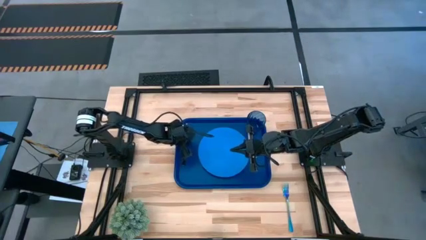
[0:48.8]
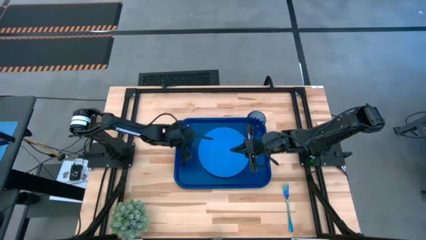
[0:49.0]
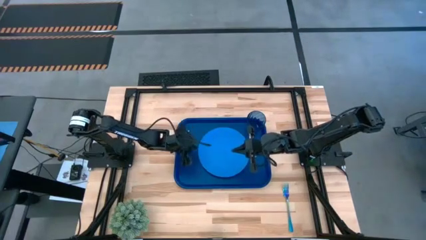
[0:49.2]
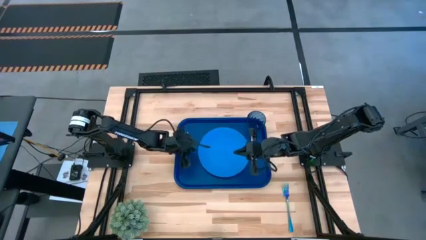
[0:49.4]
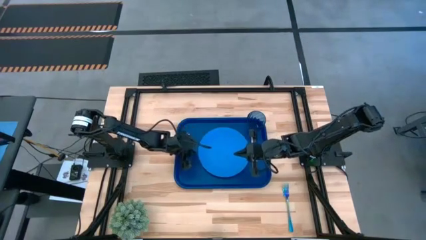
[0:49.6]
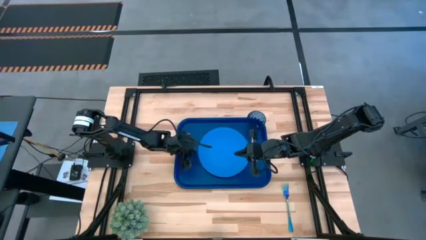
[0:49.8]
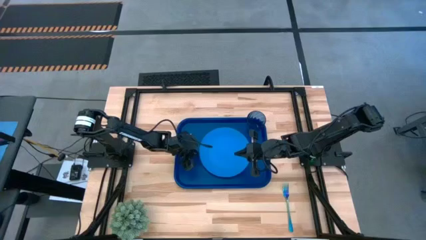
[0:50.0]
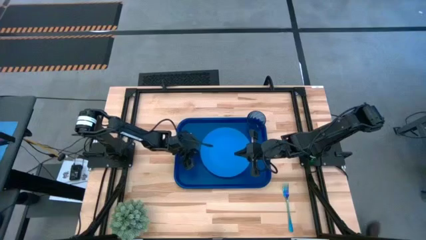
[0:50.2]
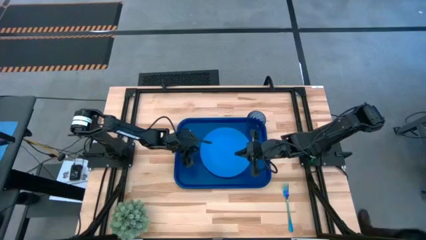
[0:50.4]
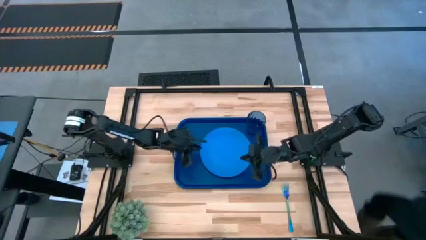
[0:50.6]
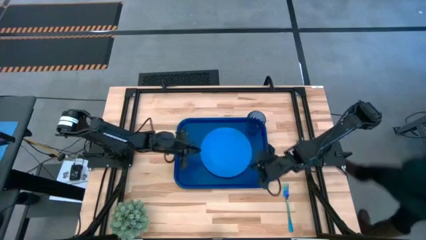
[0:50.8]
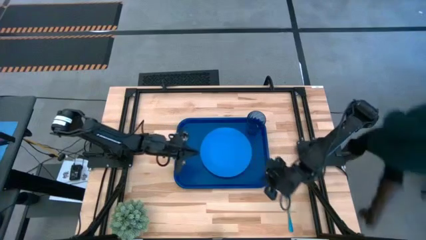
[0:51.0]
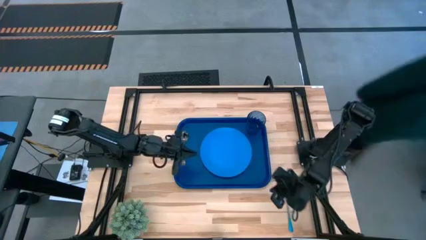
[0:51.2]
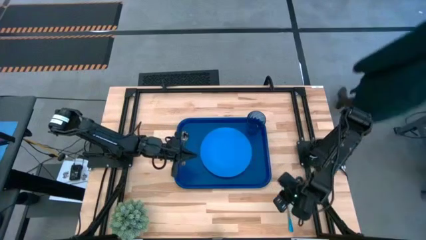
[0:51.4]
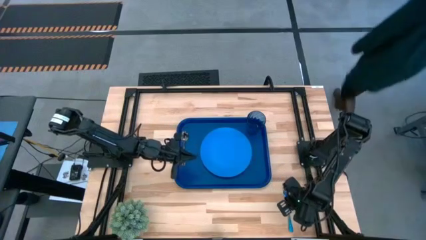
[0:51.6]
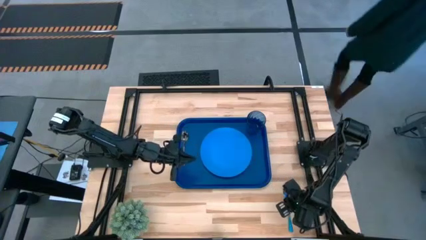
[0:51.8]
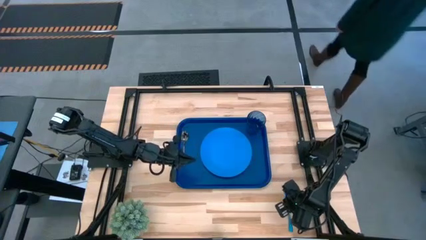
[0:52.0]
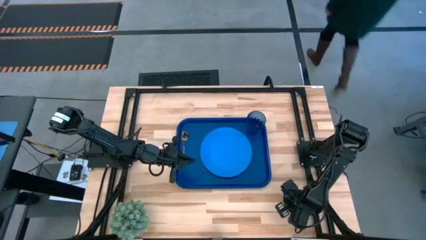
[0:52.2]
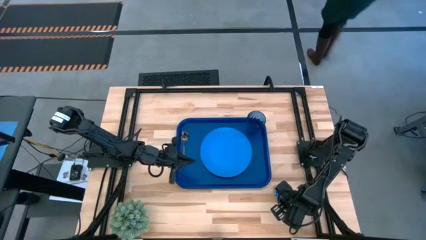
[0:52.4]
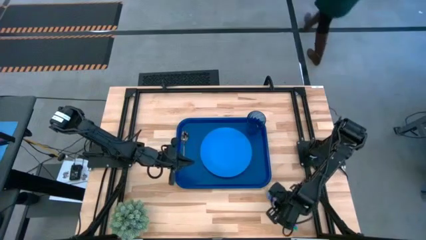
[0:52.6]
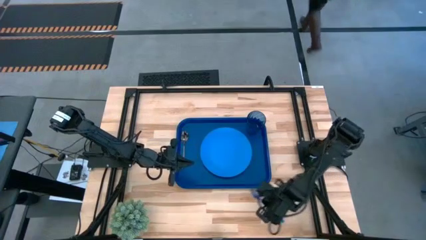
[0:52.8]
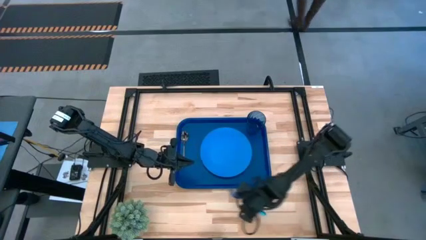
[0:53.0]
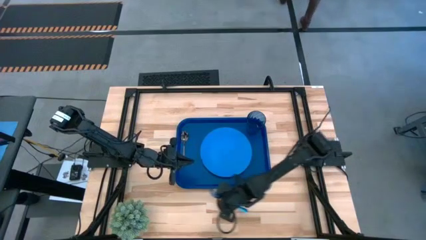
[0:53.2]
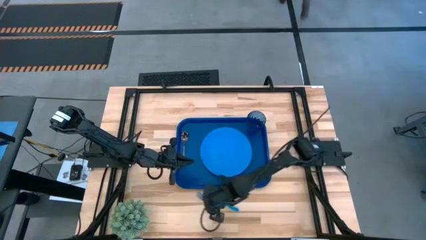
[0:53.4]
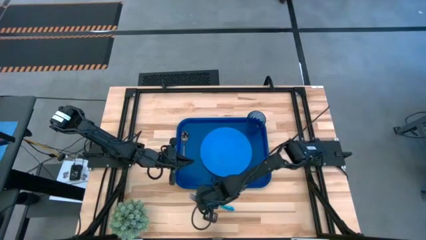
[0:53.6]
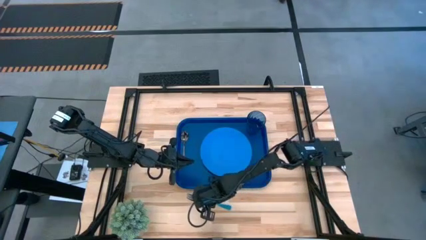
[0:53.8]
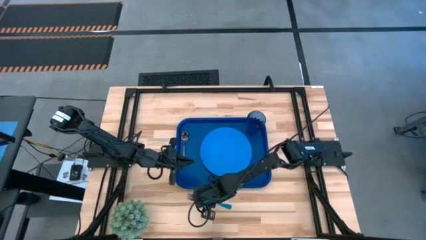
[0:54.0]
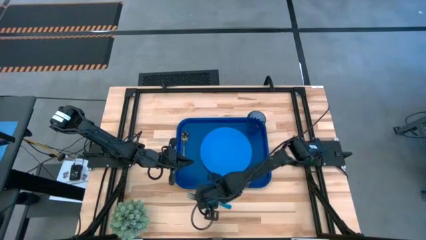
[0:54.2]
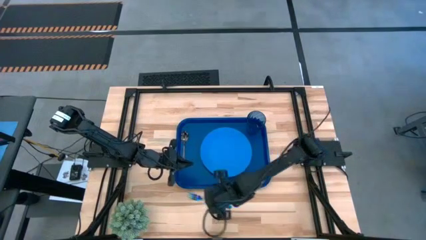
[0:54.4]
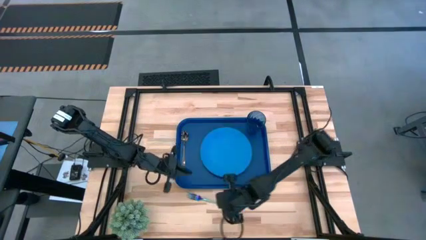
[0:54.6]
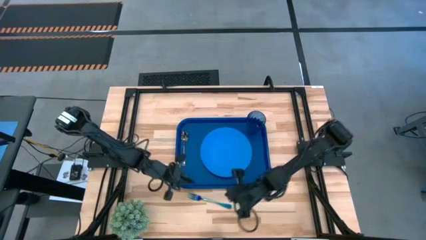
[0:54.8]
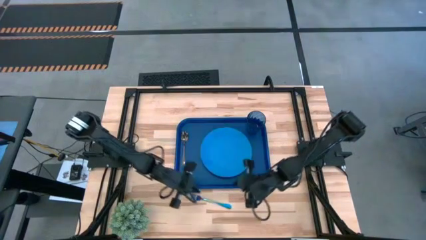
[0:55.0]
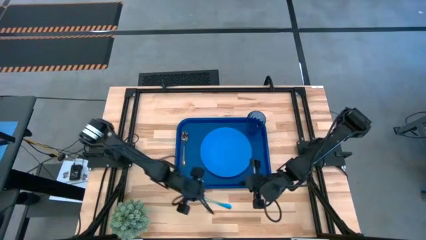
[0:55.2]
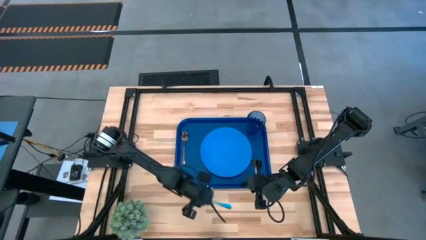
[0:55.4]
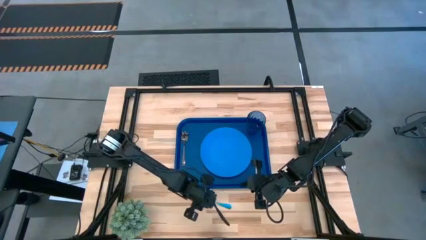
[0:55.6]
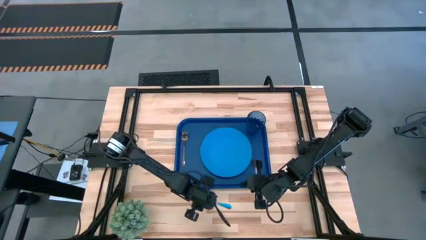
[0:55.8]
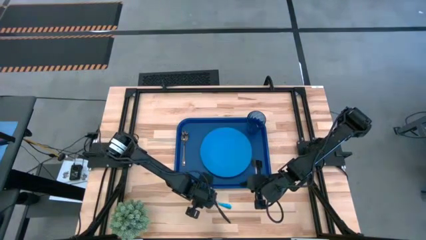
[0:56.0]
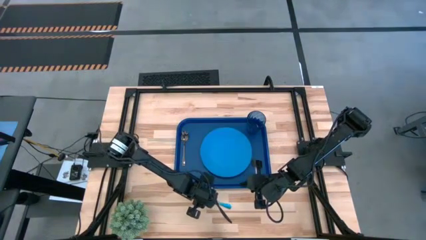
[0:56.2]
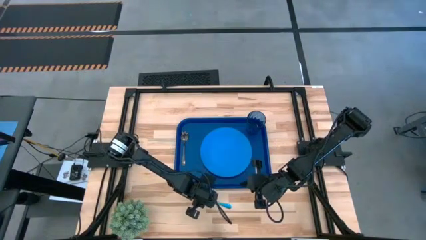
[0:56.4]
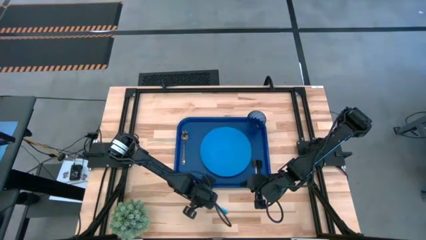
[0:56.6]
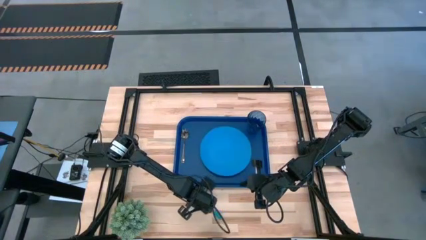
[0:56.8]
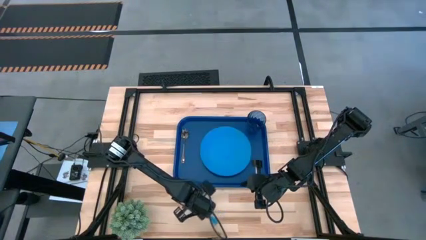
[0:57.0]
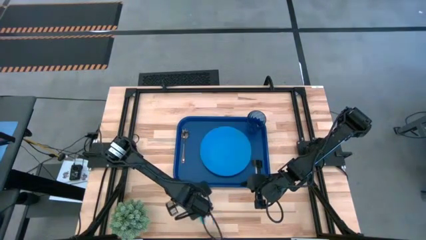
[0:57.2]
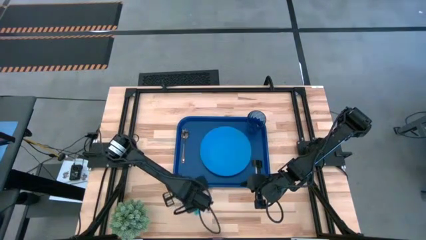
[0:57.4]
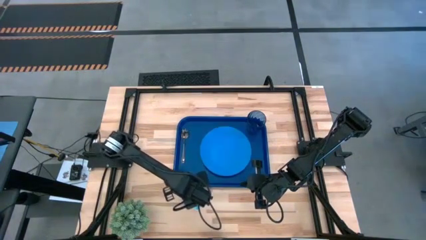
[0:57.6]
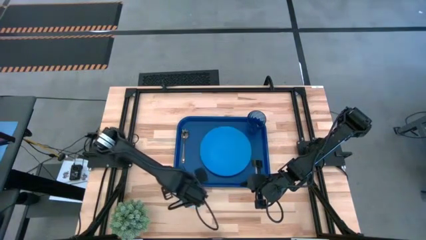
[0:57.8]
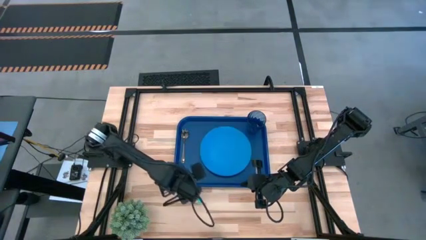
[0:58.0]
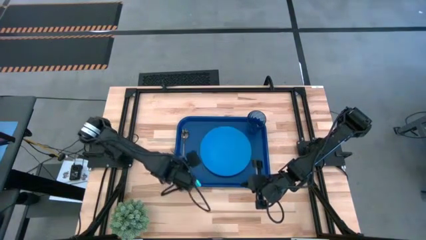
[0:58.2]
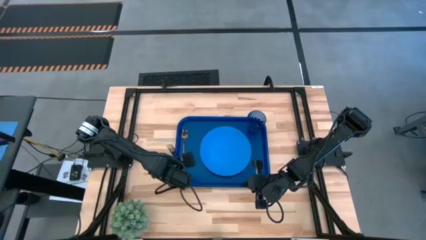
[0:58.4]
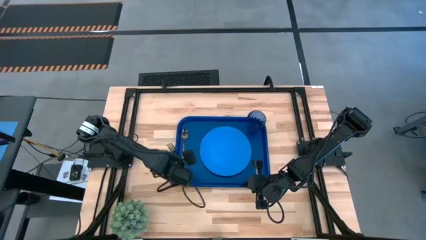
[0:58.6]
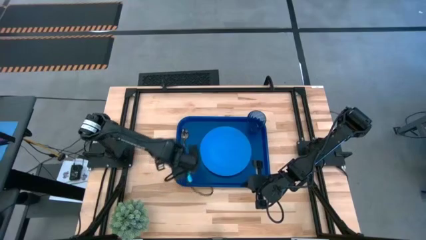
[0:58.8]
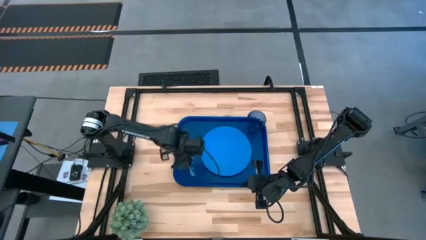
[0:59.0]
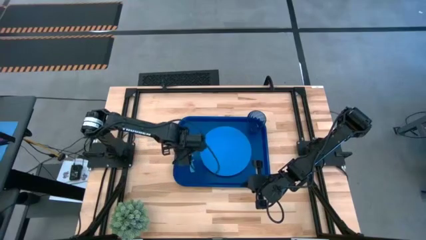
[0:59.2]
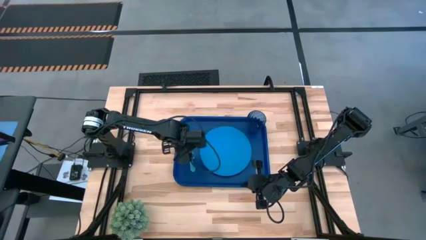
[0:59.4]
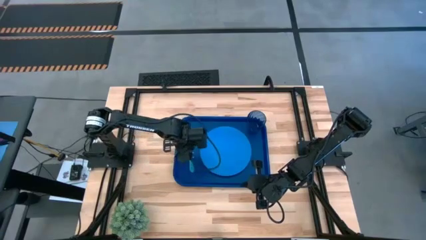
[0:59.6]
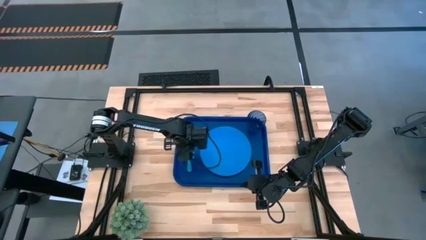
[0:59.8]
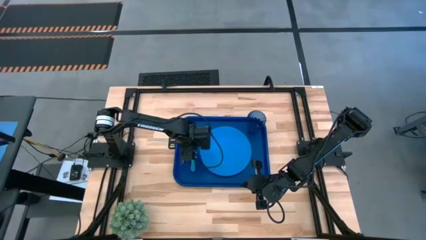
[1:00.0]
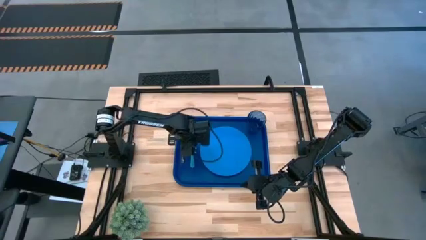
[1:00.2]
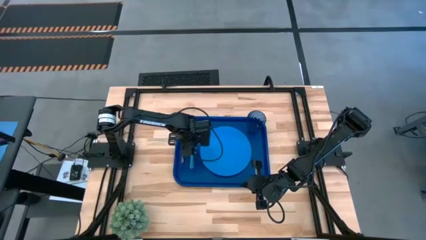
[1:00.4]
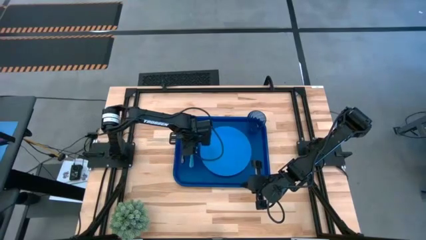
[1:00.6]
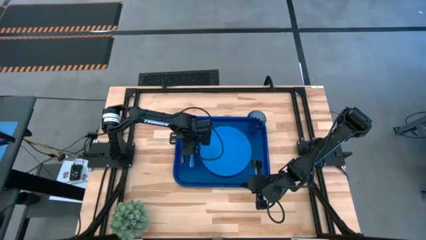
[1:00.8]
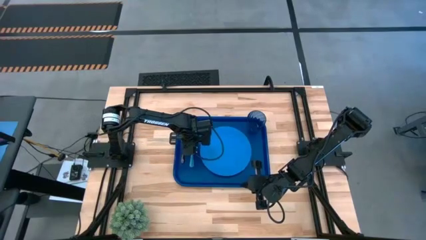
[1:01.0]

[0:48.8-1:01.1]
Task: Pick and place plate/cup/fork/spoon on tray
Put the blue fork on the dark blue tray to the right of the black spoon

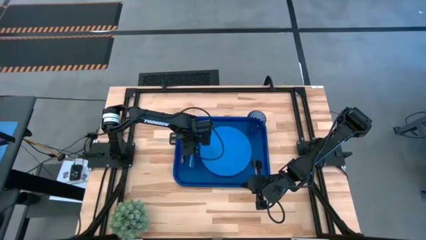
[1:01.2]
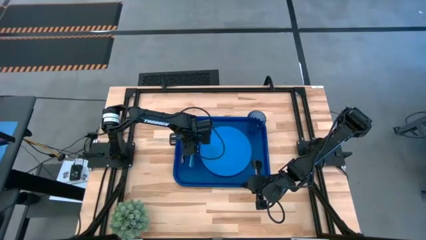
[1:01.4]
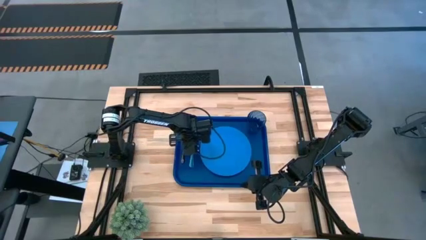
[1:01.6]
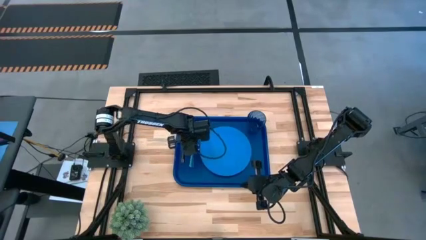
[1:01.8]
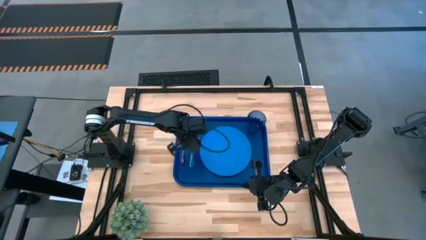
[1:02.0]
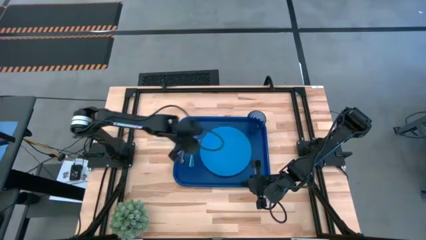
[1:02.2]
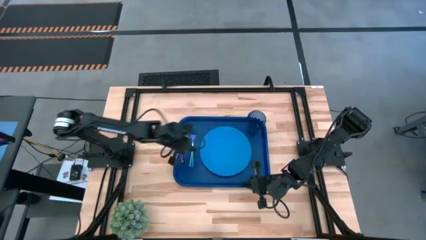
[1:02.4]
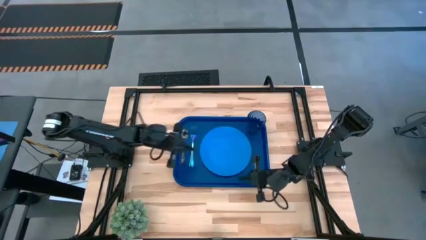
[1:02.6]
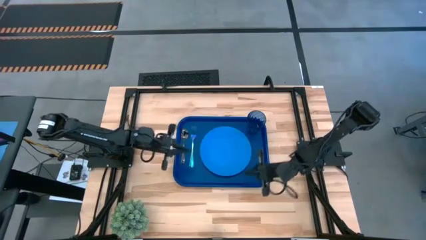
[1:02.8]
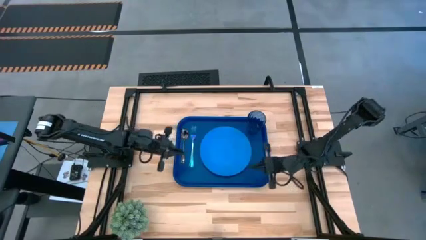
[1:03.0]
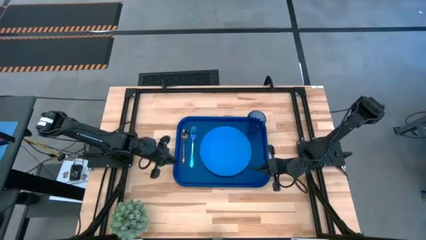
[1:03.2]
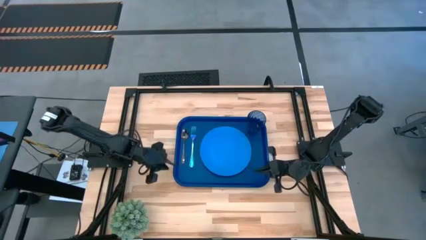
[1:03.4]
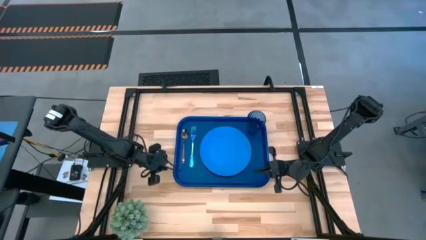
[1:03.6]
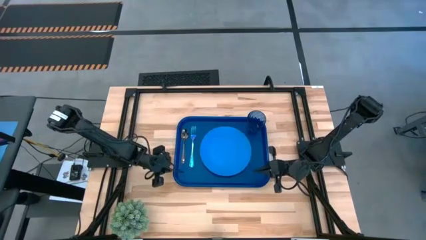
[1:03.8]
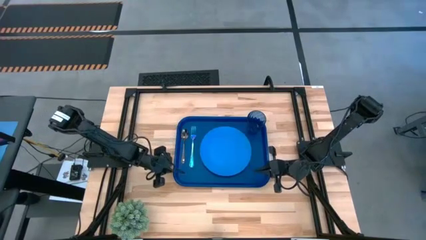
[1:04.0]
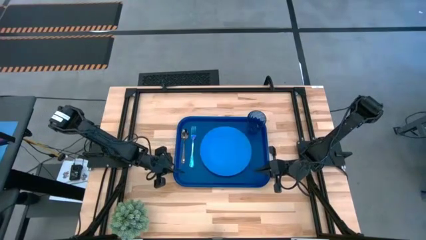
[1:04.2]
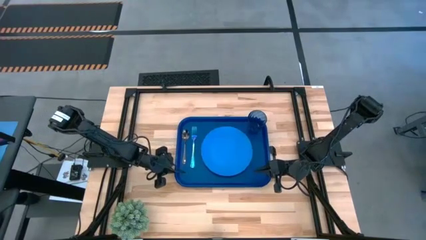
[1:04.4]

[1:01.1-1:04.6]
Adjust the dark blue tray
